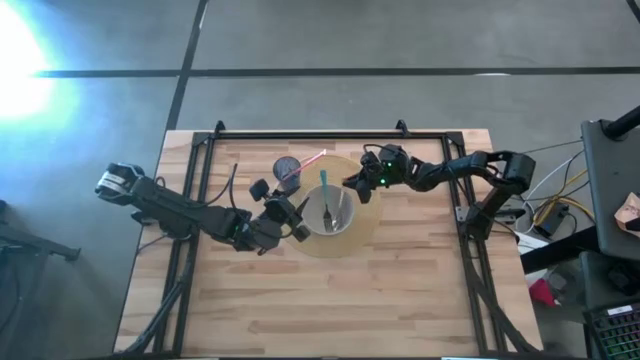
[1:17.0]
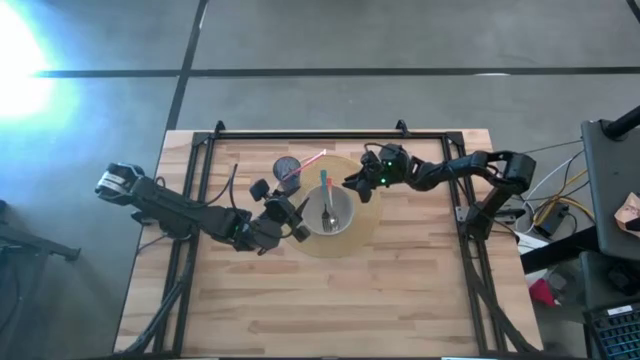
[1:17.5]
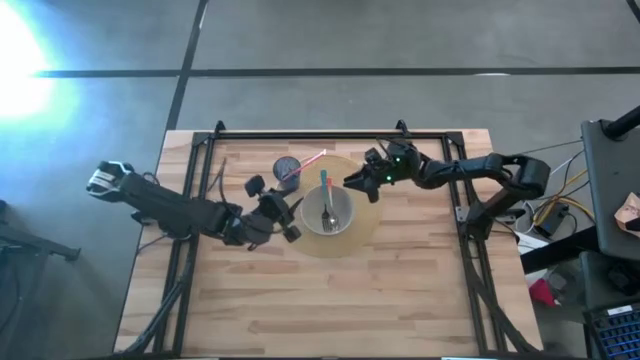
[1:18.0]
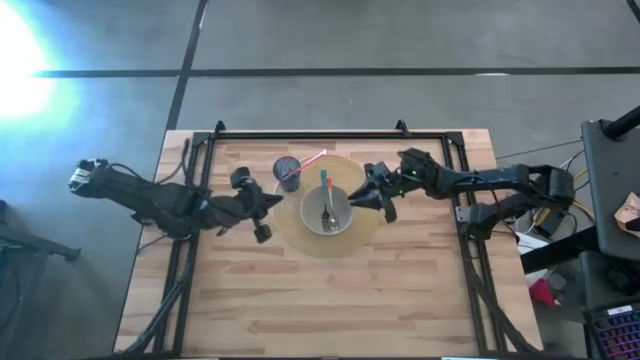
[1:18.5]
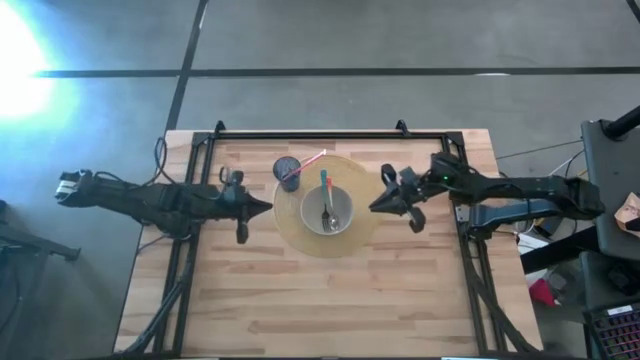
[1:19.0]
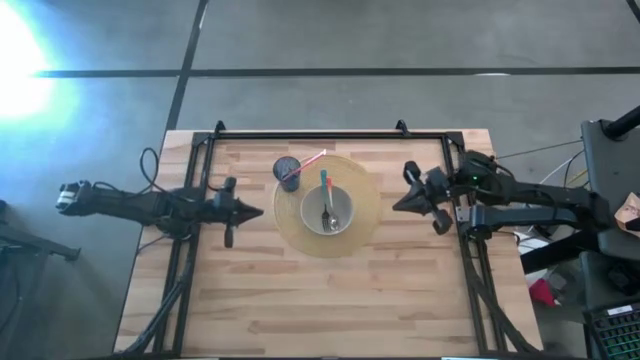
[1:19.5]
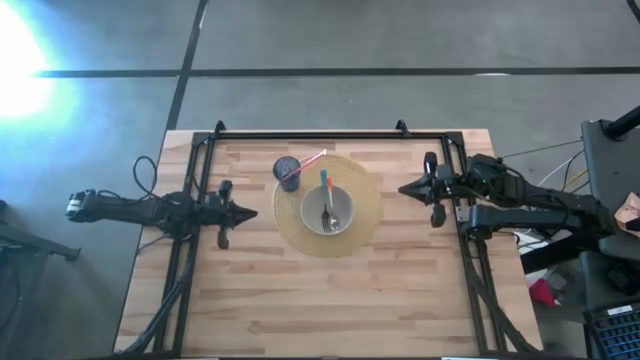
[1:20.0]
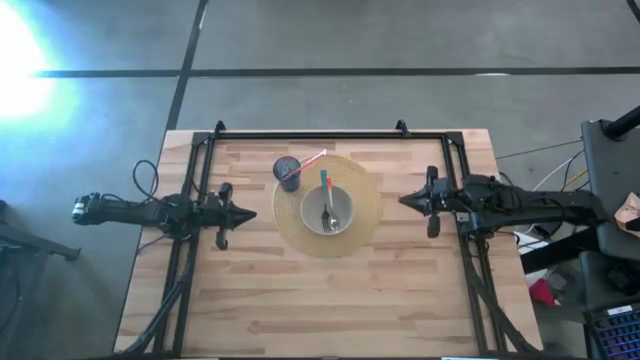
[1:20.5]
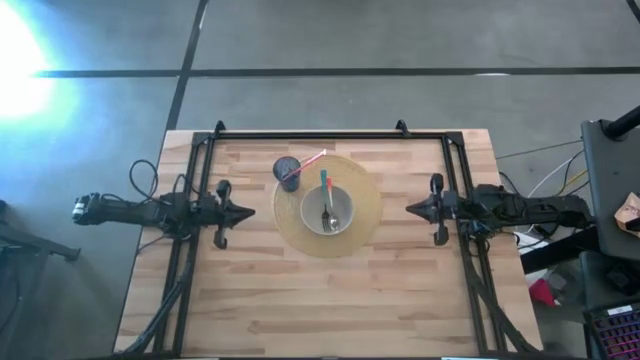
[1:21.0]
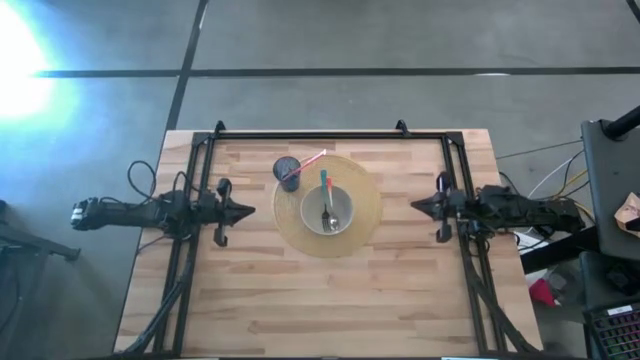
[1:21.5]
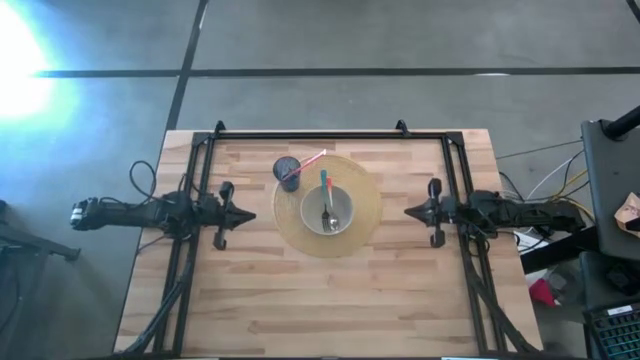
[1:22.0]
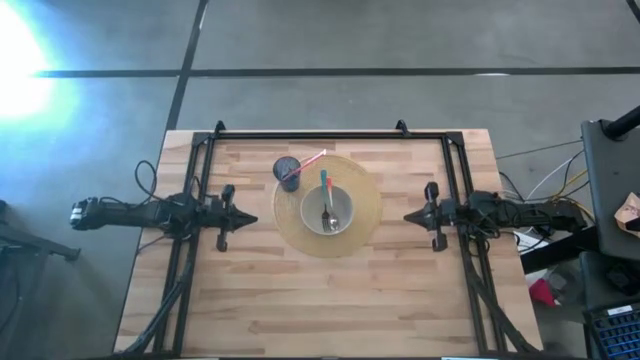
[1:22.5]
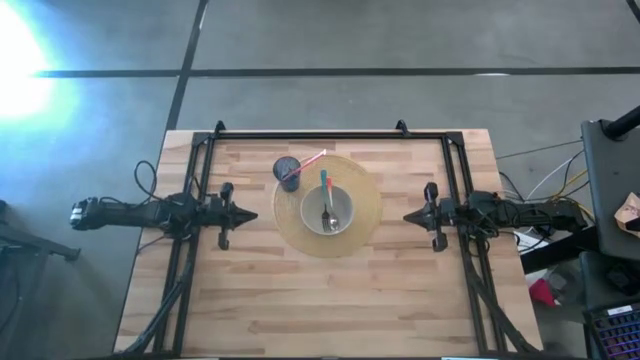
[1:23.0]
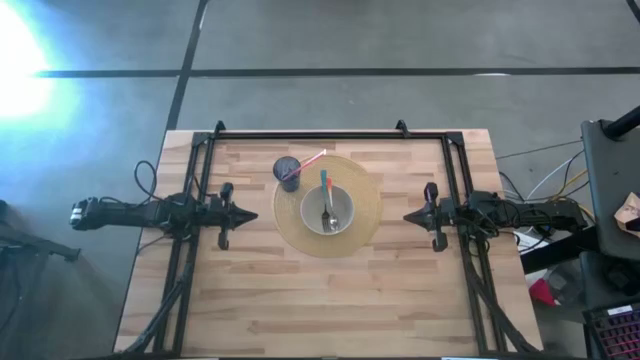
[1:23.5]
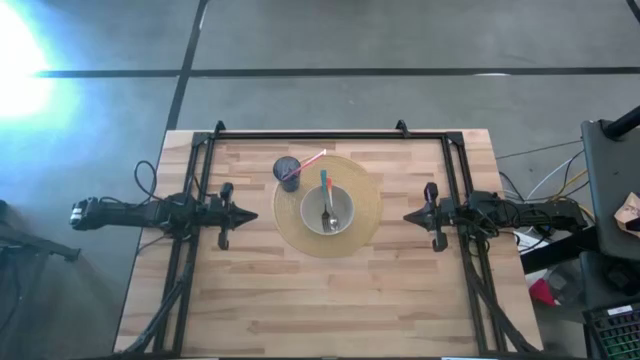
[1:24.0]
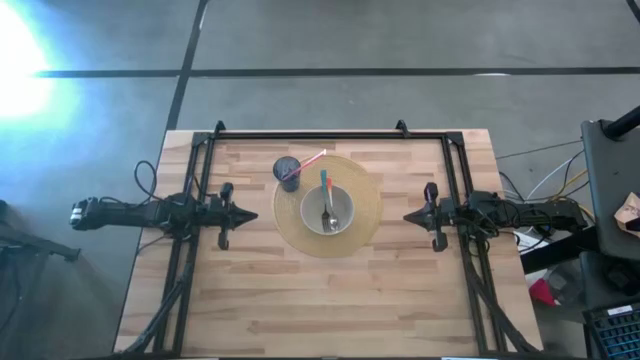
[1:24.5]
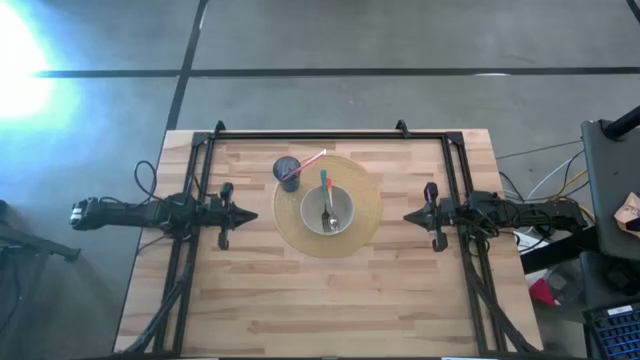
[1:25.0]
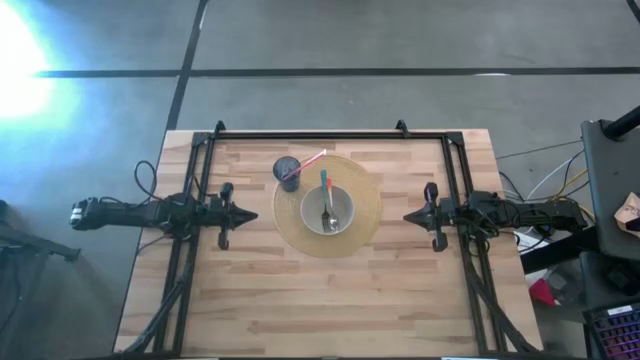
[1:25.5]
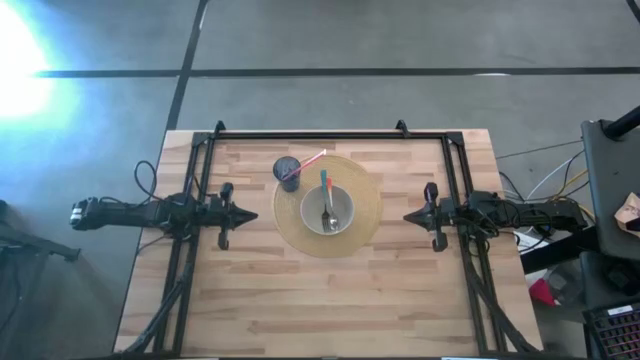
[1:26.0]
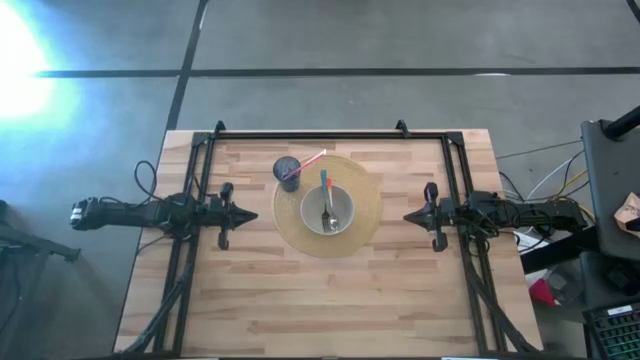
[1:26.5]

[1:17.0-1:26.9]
Task: Pick & Place Utensil
Return to Home Position

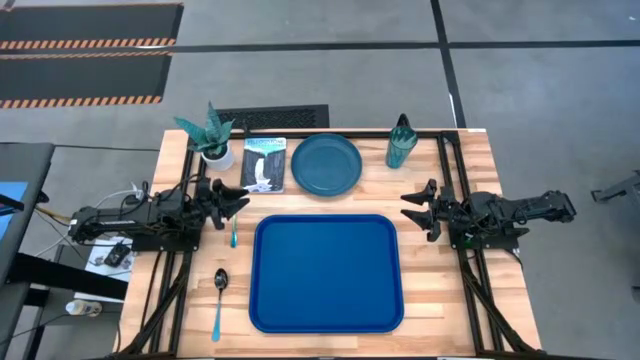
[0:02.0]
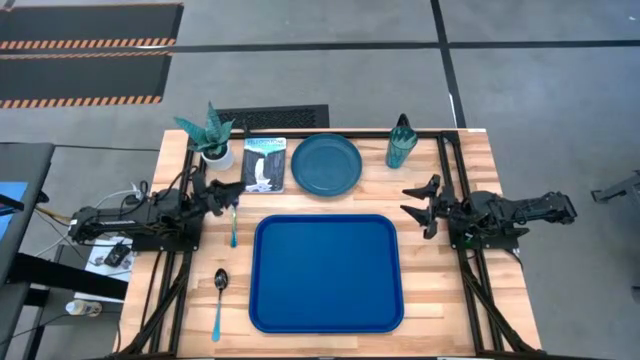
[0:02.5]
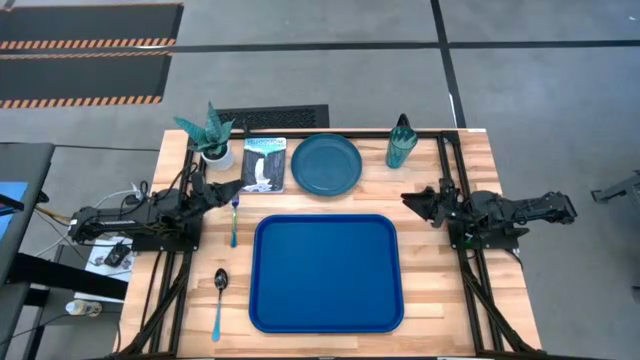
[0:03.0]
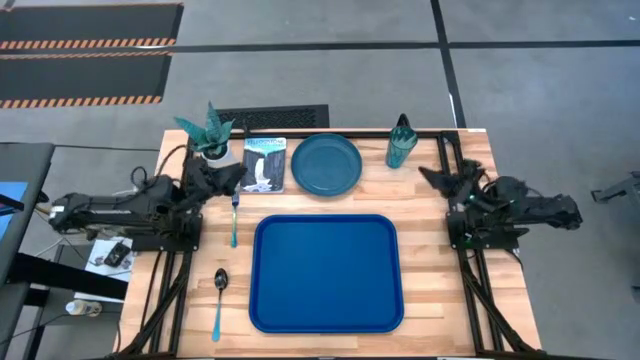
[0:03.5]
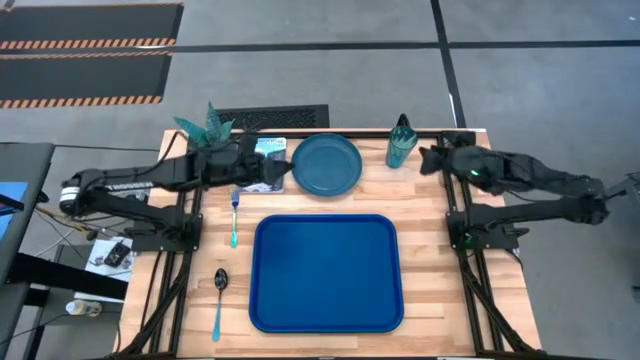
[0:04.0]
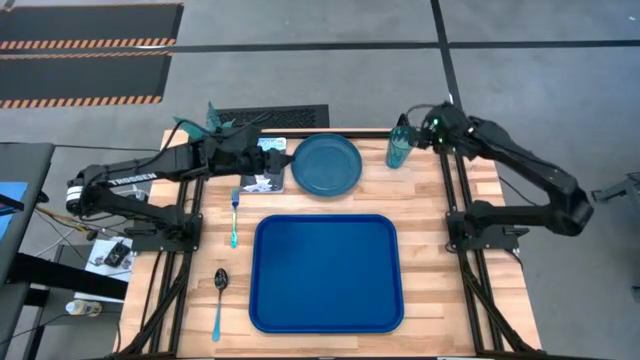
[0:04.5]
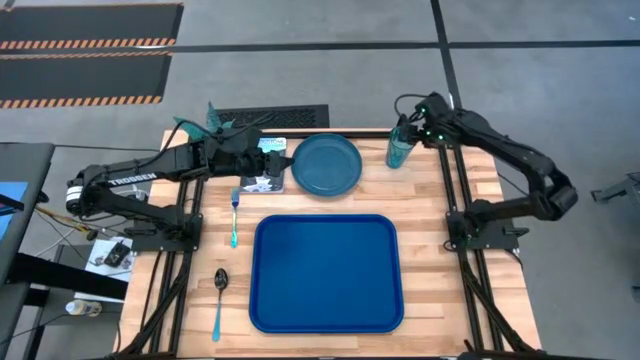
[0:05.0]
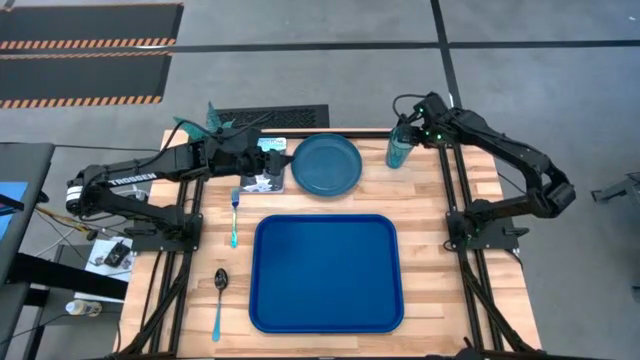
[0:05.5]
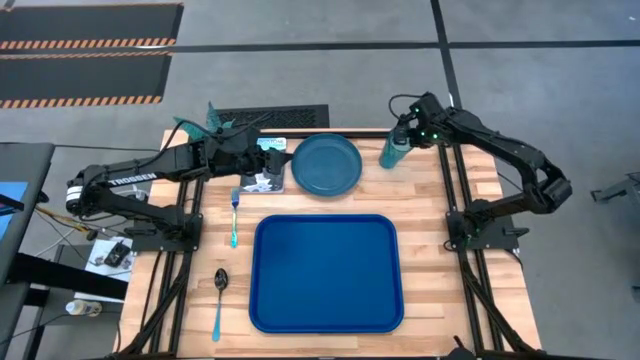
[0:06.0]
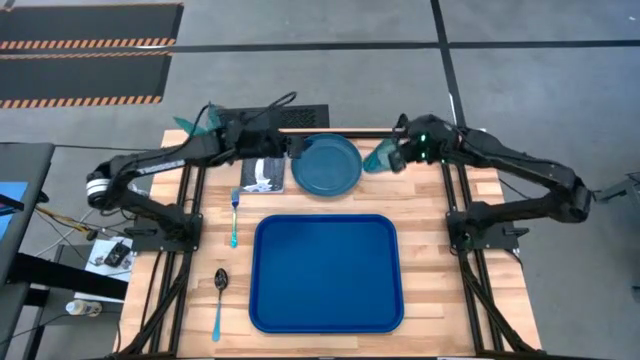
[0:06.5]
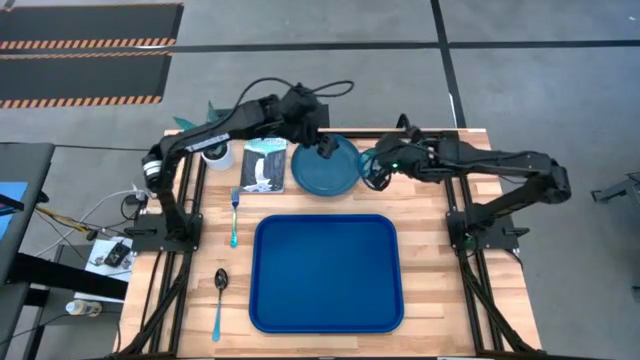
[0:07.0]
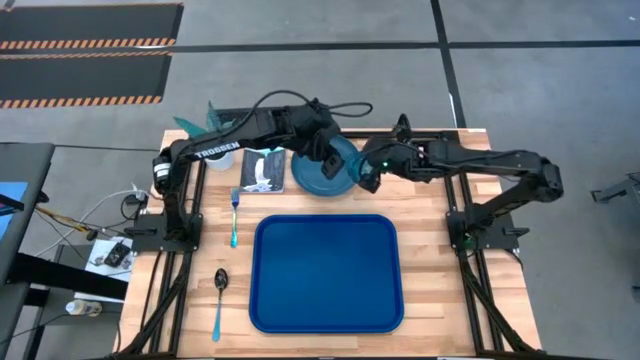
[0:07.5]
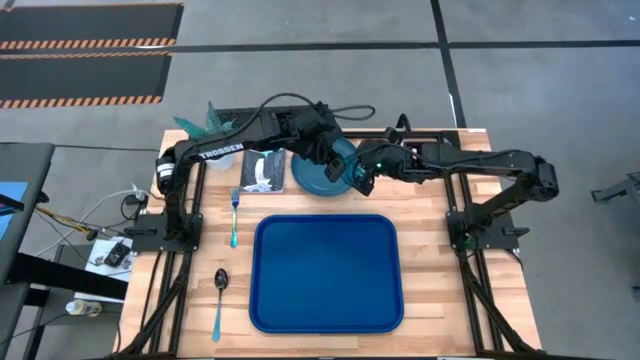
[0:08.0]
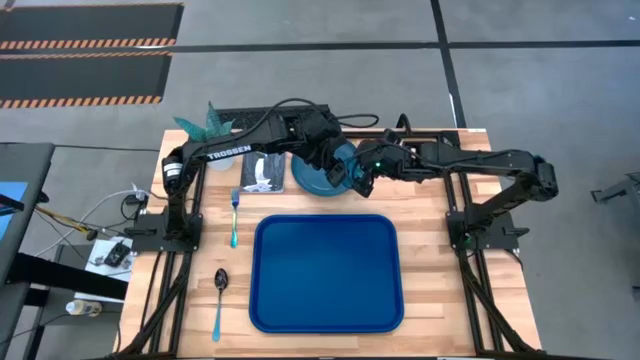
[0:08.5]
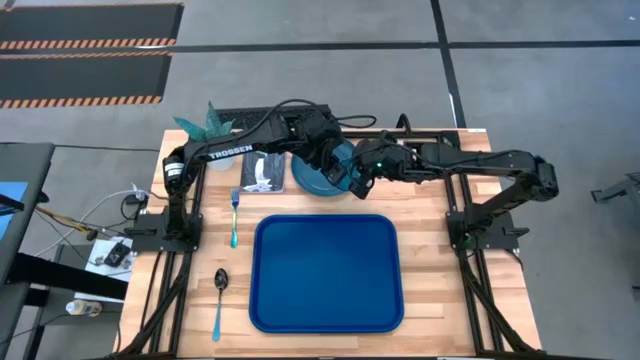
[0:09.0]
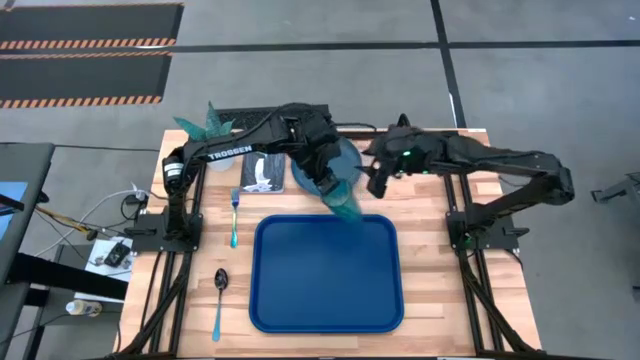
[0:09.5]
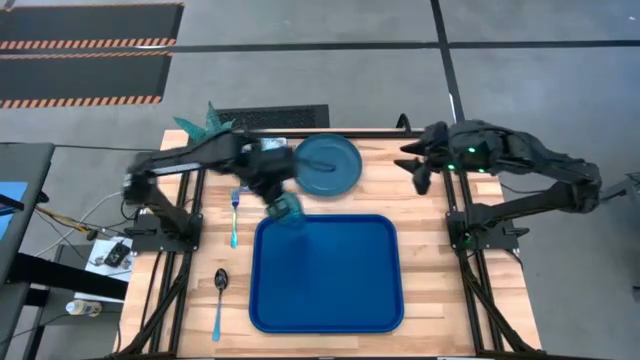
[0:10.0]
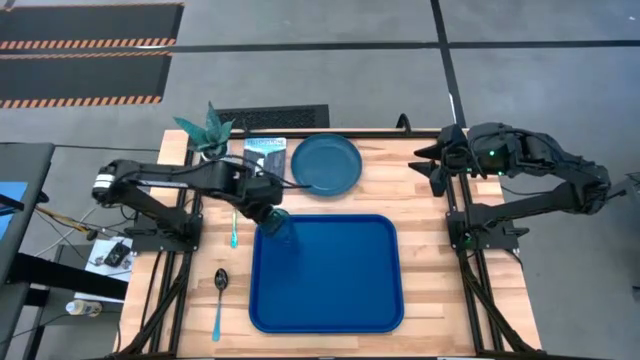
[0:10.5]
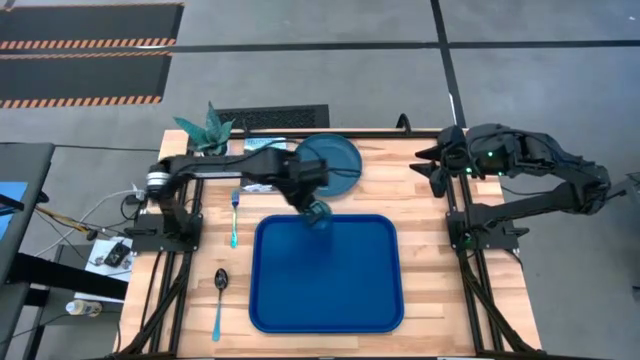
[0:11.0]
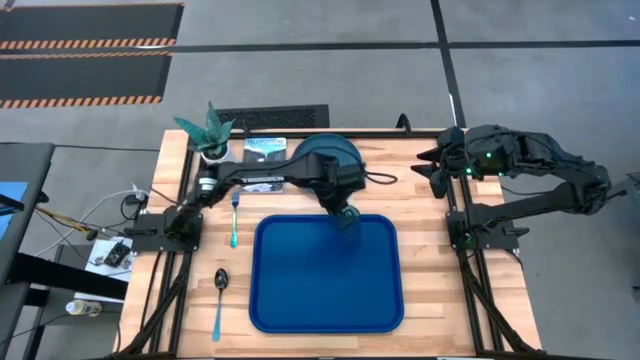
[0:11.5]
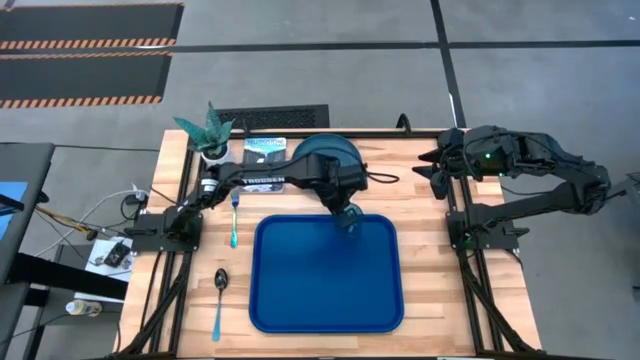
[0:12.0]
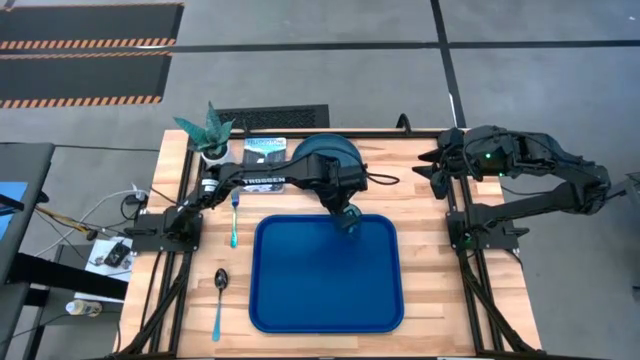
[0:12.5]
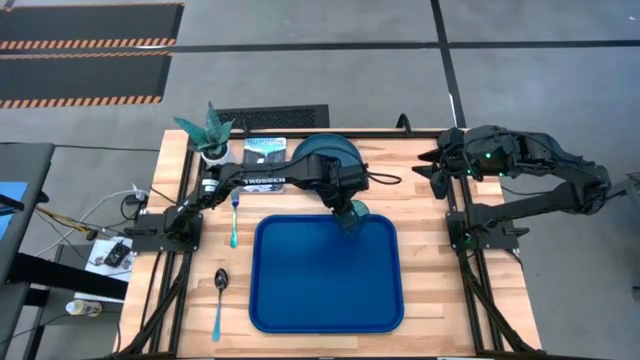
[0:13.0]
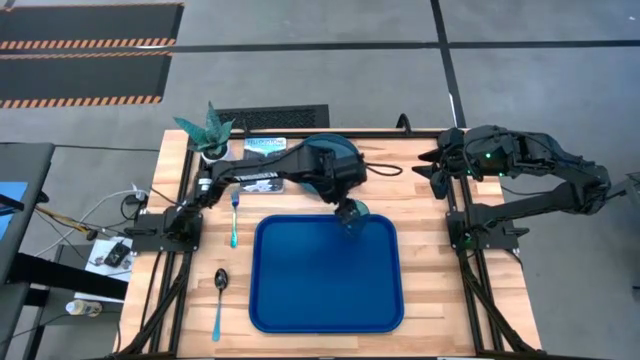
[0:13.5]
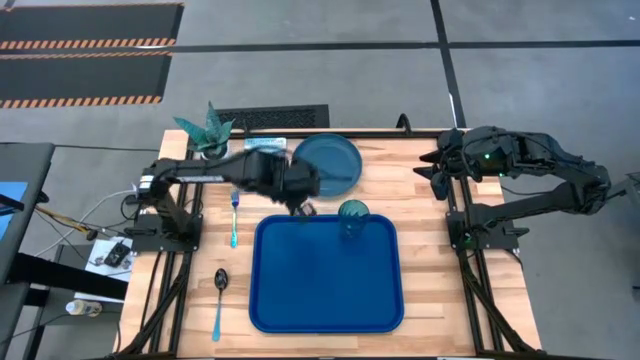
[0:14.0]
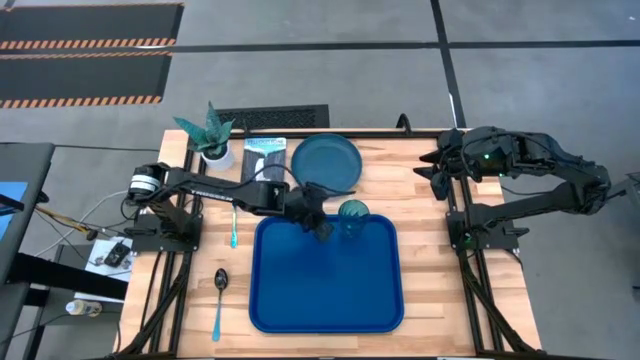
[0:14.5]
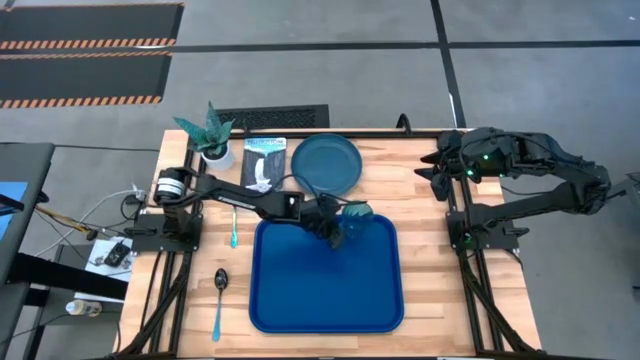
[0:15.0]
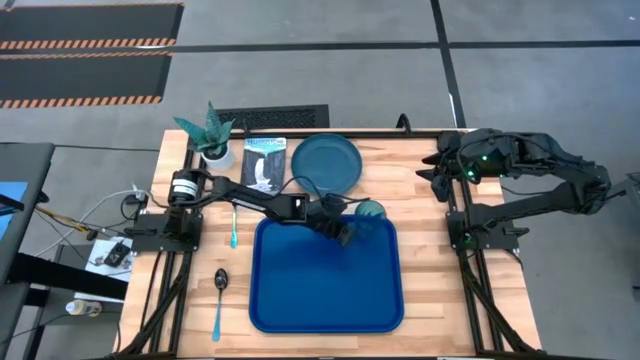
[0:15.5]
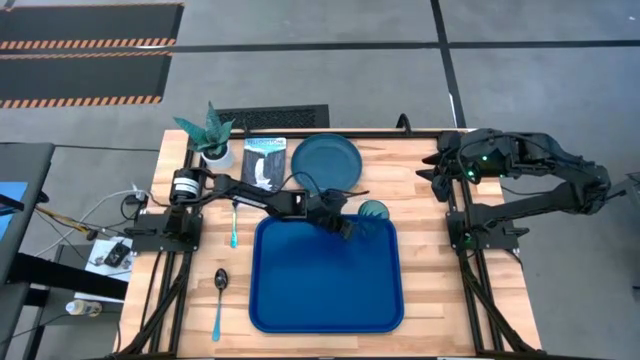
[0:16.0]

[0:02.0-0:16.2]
Task: Pick and place plate/cup/fork/spoon on tray
Put the blue cup on the top right of the blue tray
